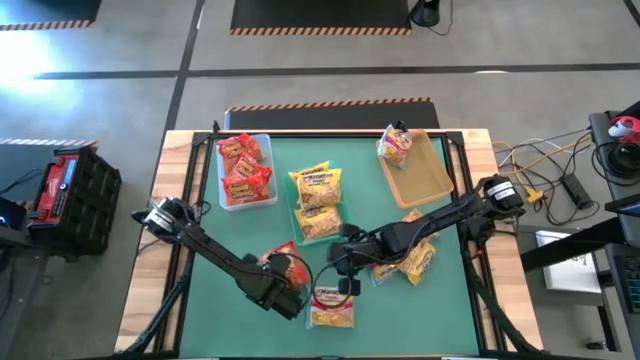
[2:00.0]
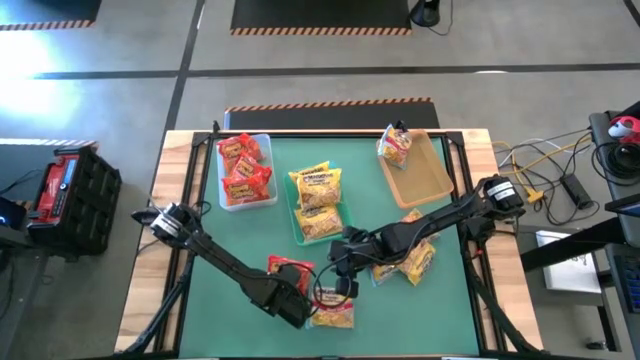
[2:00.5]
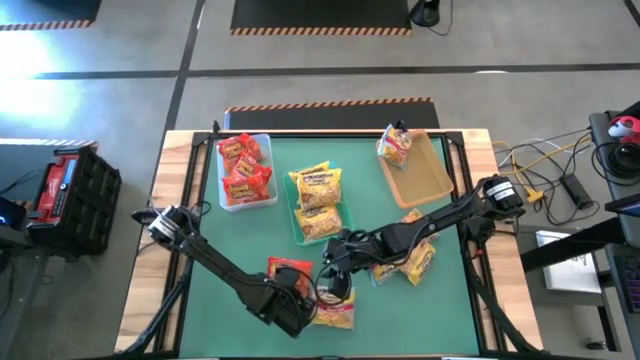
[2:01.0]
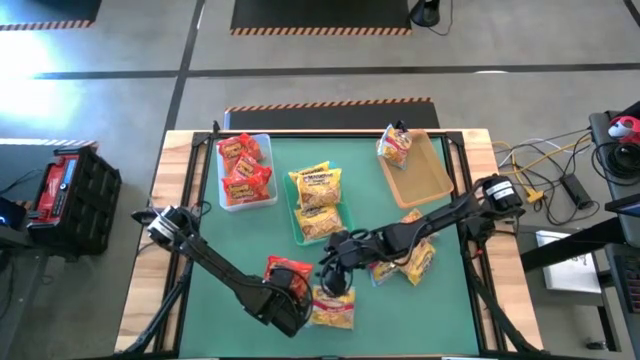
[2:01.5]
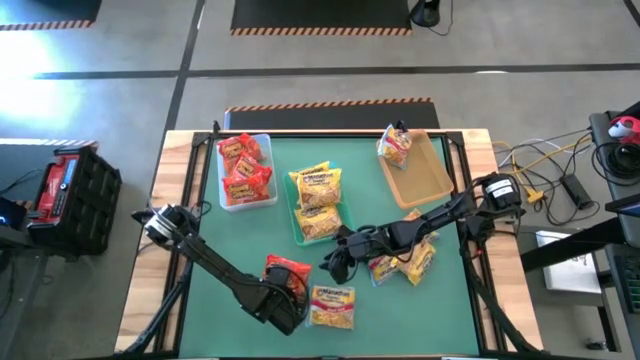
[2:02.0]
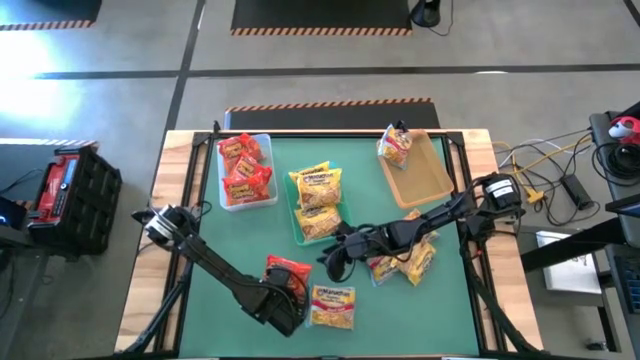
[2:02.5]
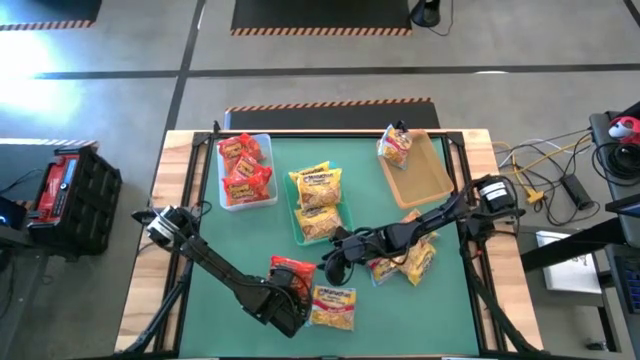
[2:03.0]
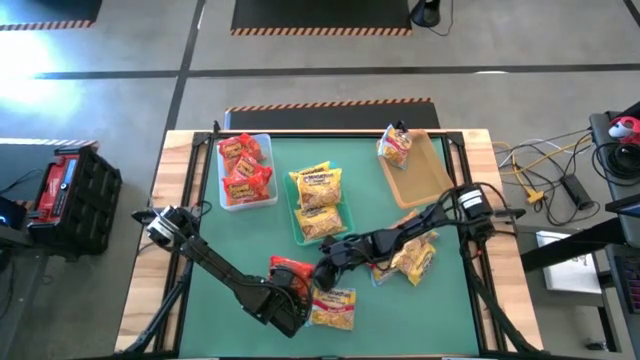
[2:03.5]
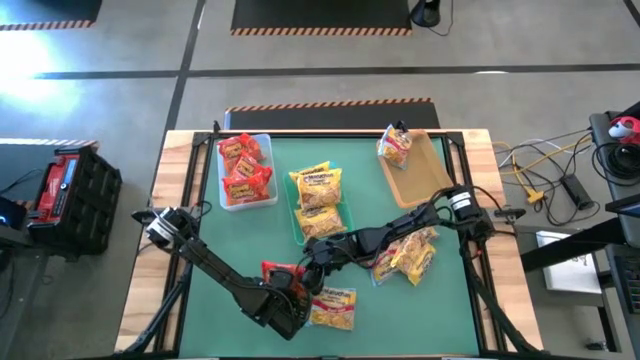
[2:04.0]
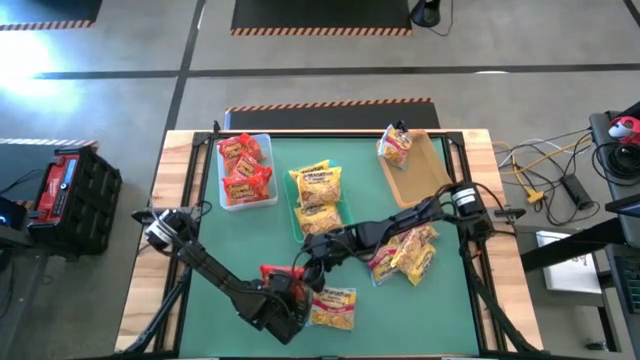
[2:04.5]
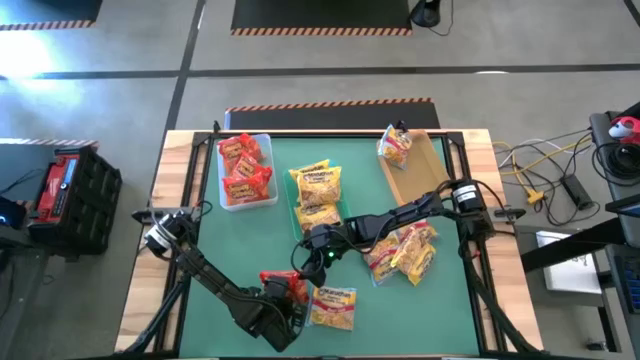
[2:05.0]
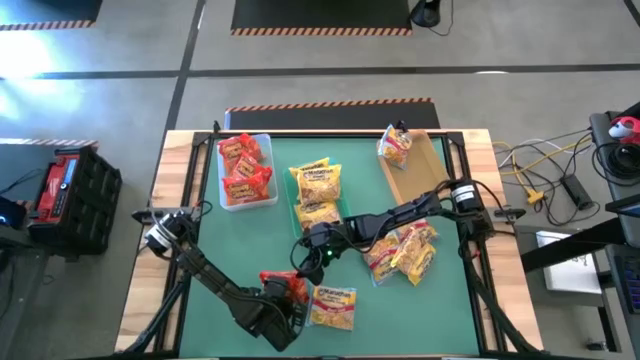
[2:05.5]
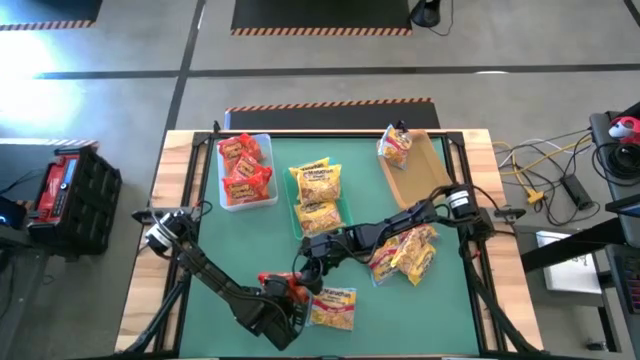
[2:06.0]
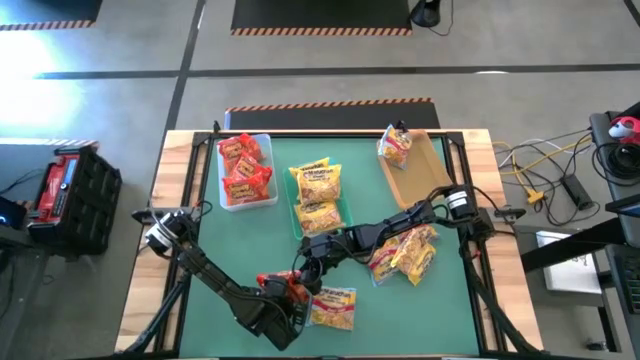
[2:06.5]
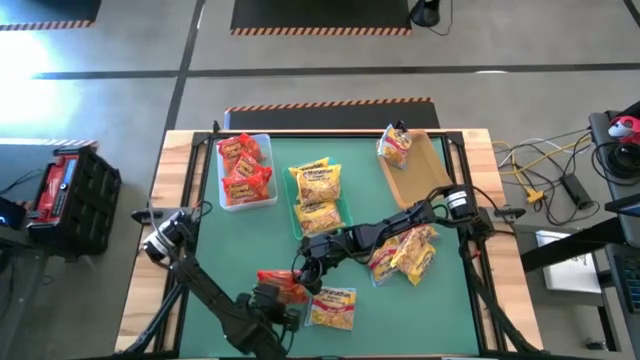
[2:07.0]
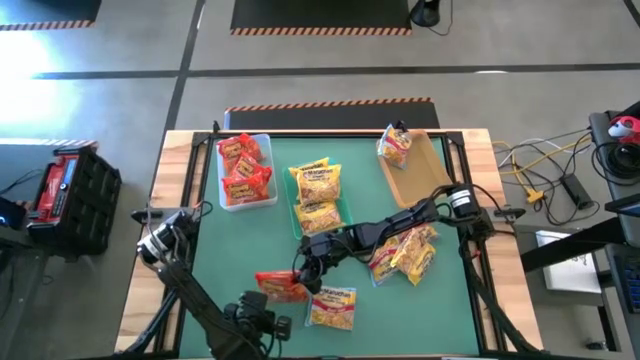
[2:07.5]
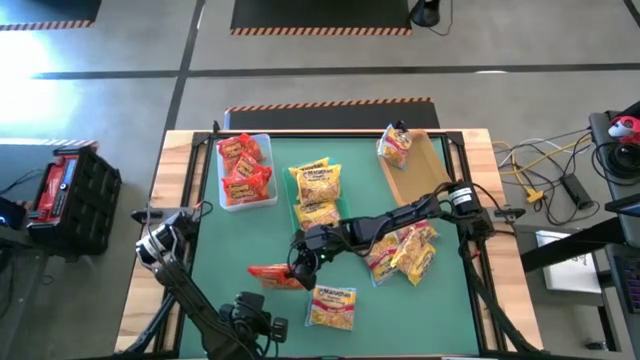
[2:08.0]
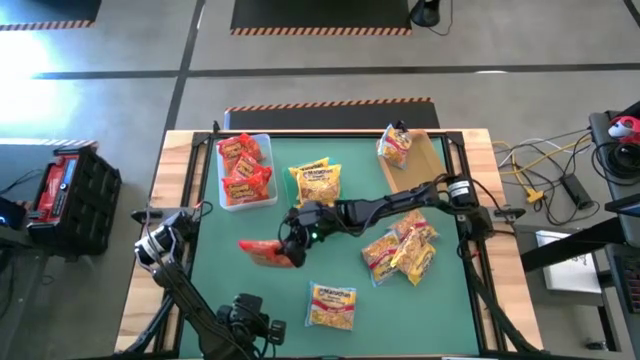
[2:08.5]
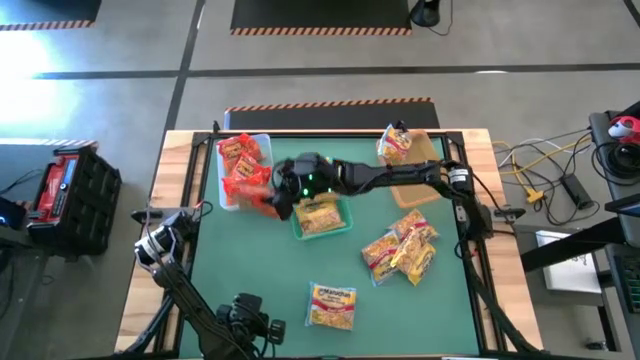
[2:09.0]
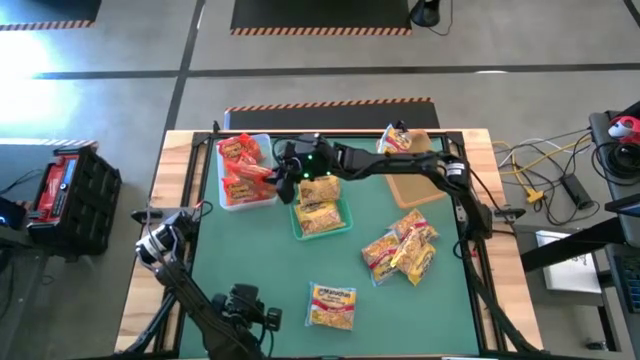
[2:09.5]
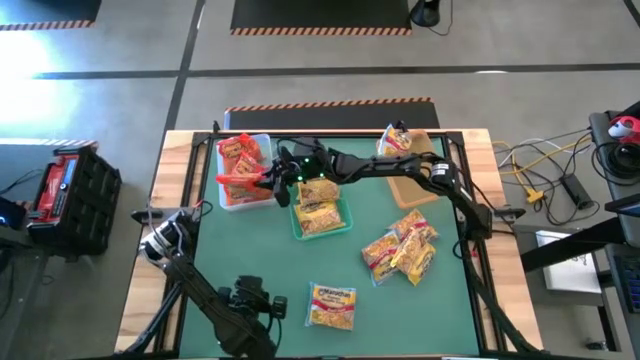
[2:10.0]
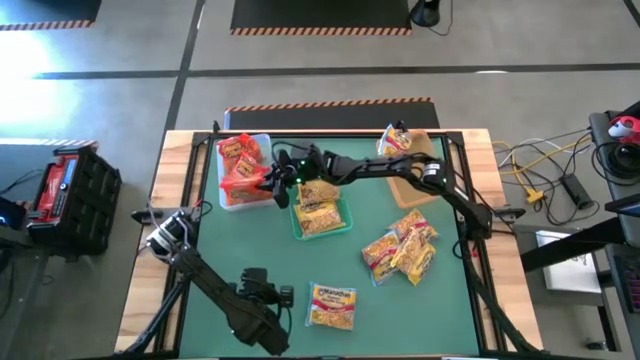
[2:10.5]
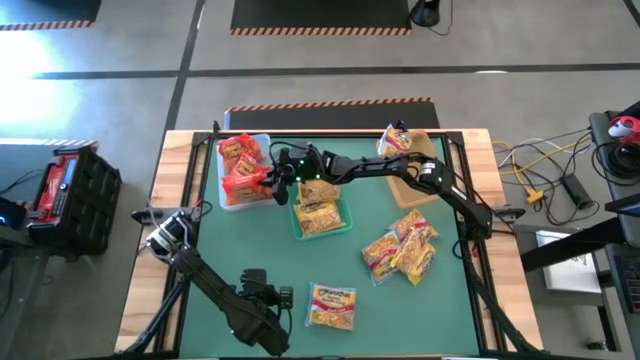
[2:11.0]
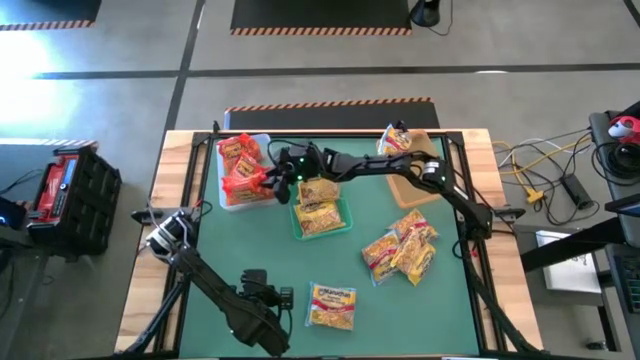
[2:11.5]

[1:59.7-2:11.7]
Task: Sort Maruchan noodles
Put the orange noodle pack into the transparent bin

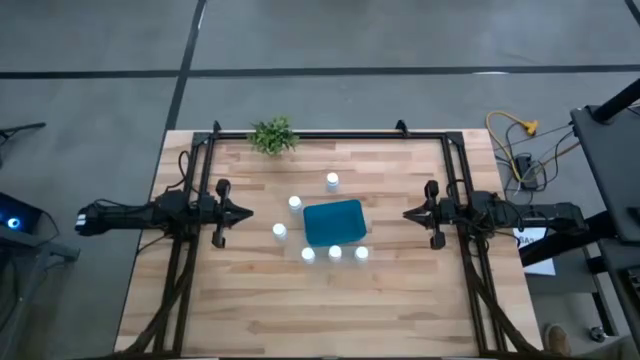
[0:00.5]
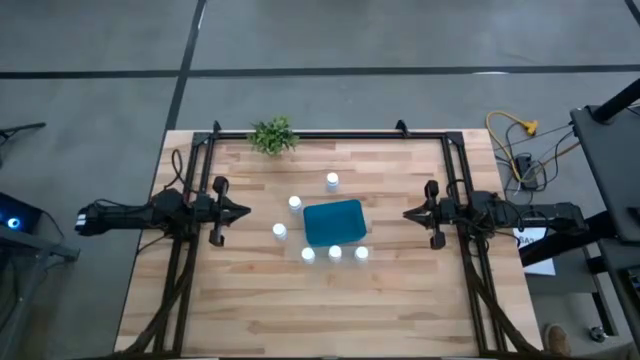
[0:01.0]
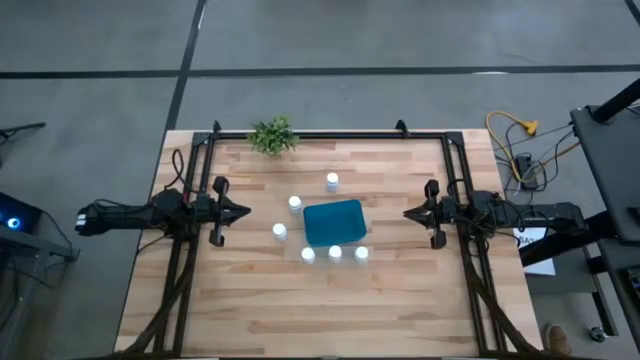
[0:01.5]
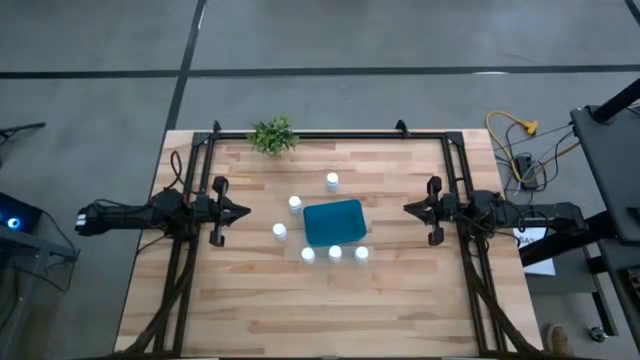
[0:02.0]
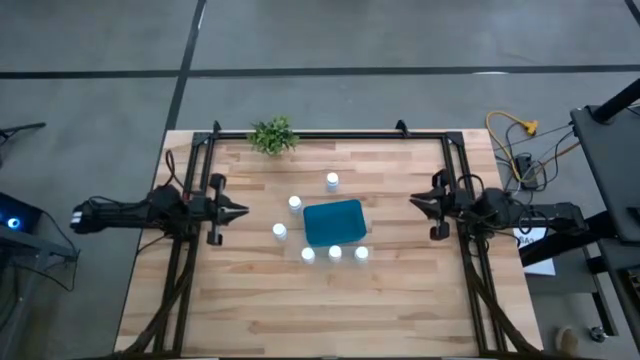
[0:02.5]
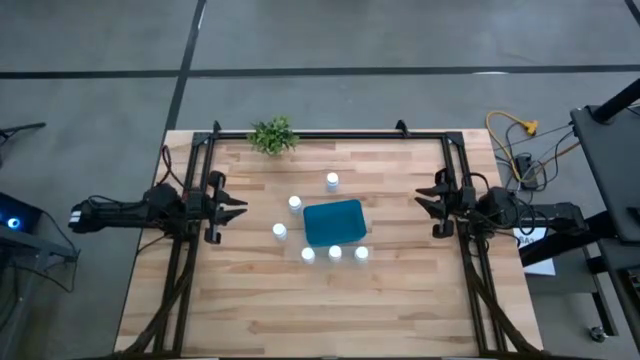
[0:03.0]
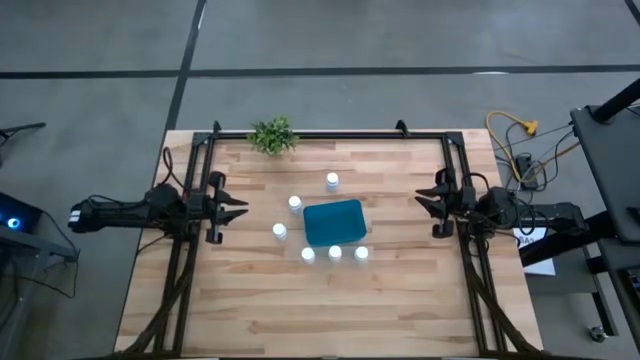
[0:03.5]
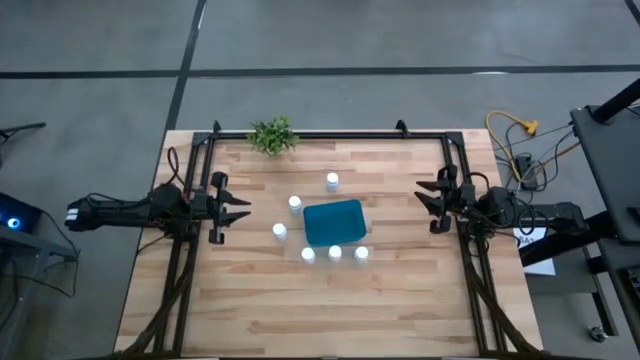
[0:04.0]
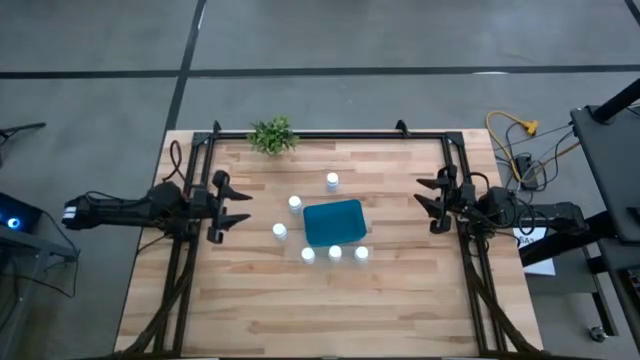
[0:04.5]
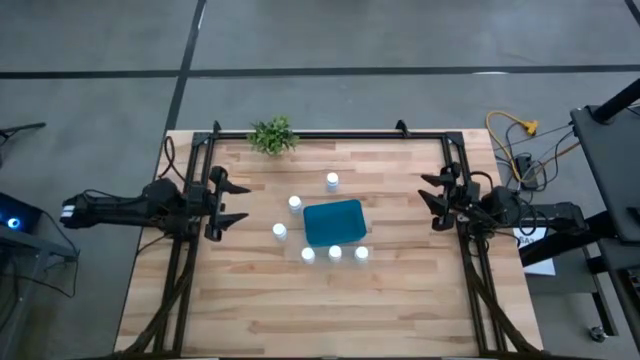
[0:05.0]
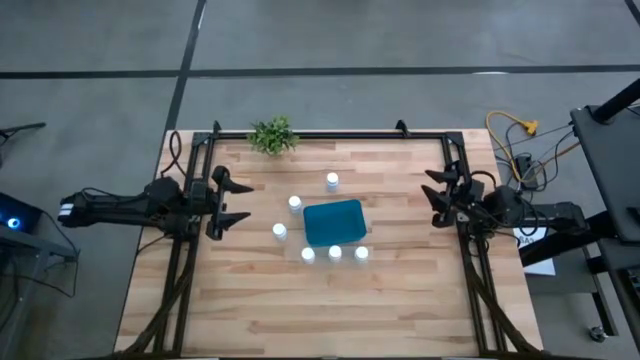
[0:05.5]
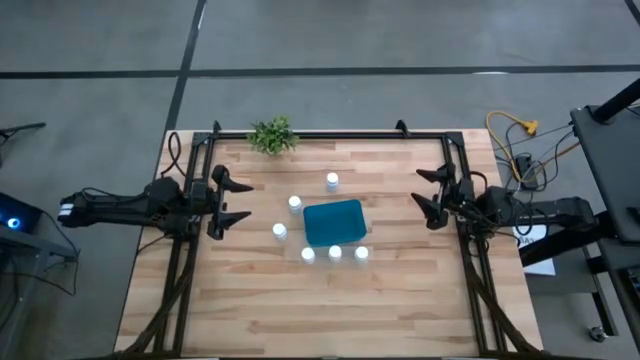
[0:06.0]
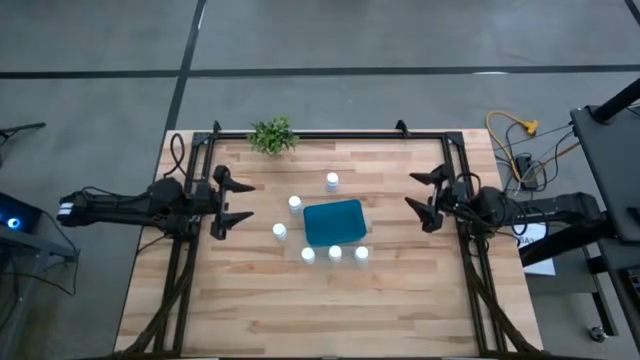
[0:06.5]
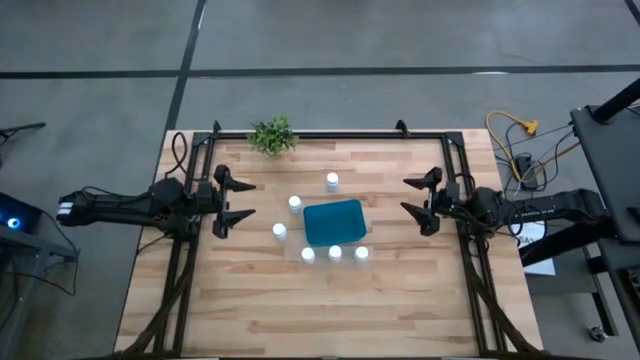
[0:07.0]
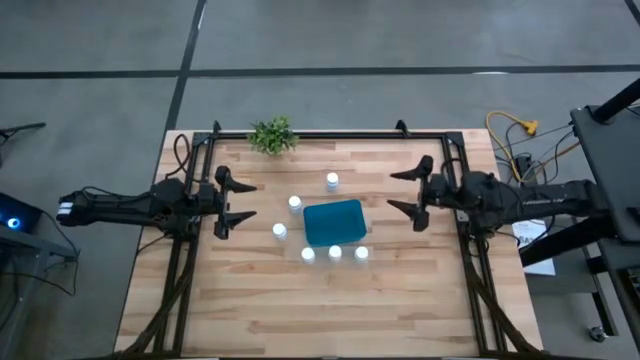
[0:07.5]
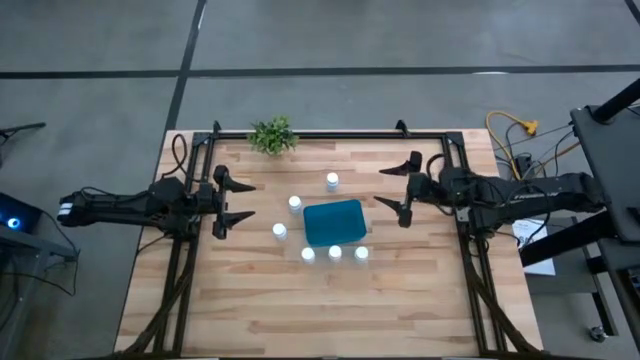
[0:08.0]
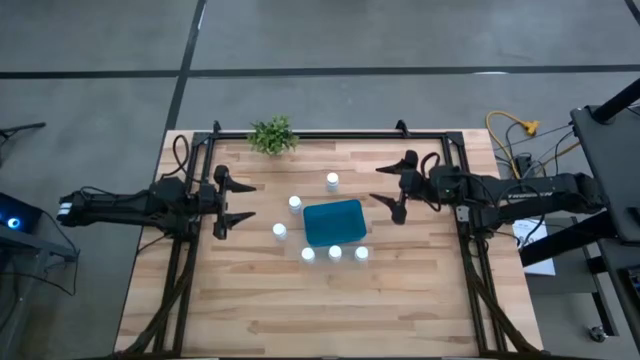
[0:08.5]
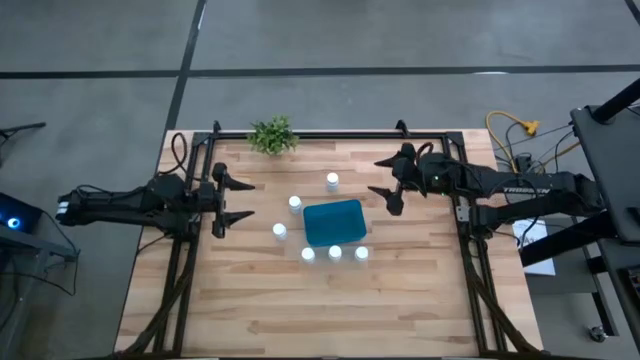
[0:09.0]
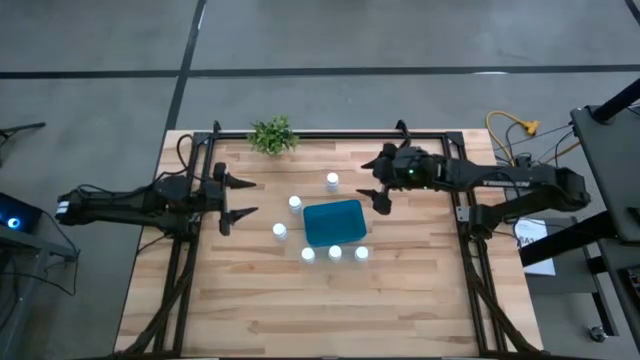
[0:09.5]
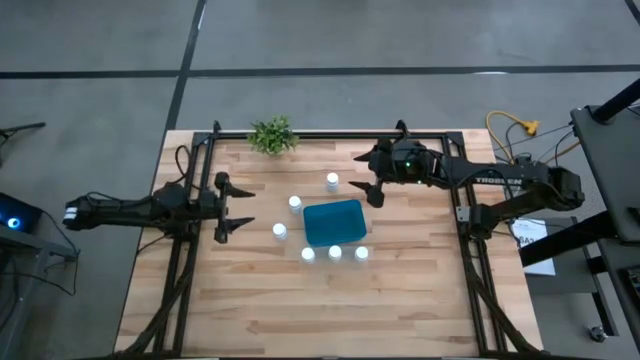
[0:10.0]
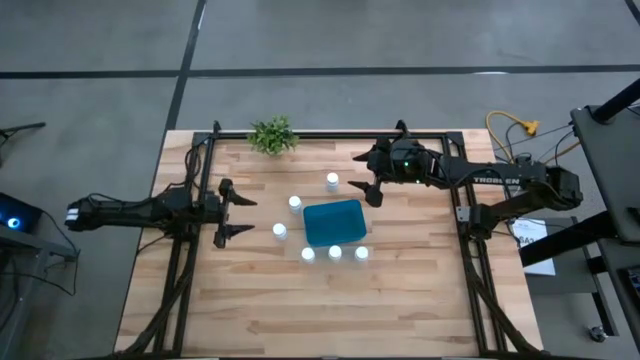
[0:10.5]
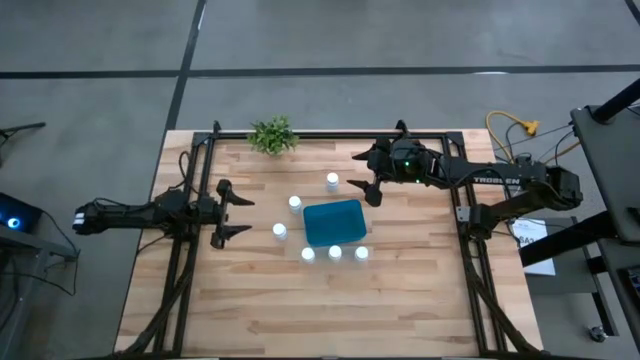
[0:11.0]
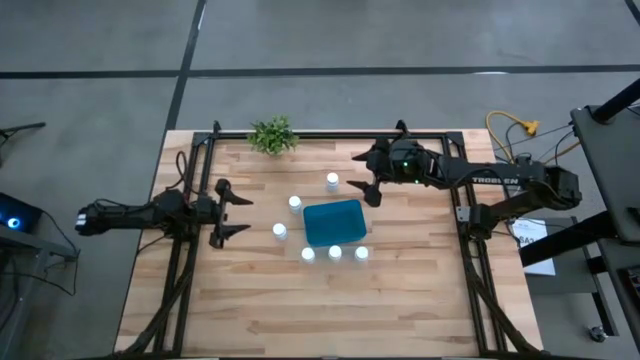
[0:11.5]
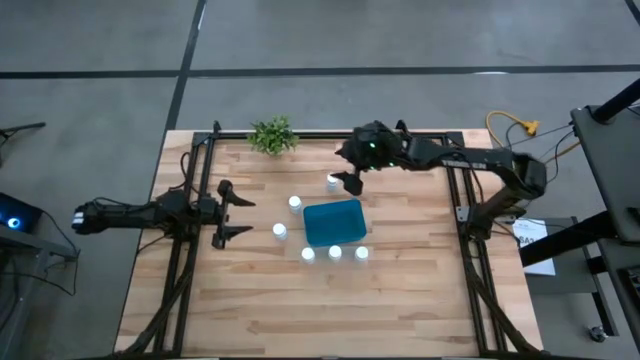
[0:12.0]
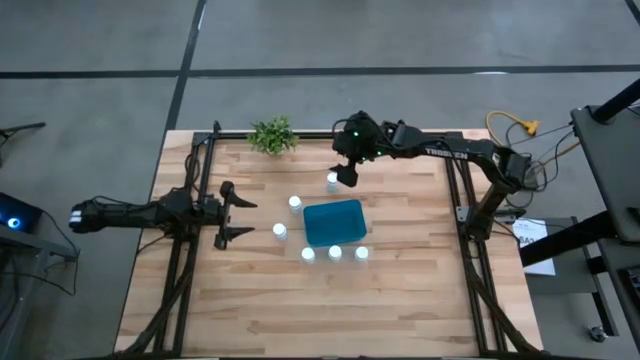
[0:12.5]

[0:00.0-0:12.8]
Task: Pick and place pill bottles into a basket
Put the white medicine bottle into the blue bin
